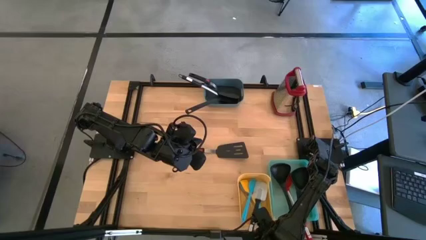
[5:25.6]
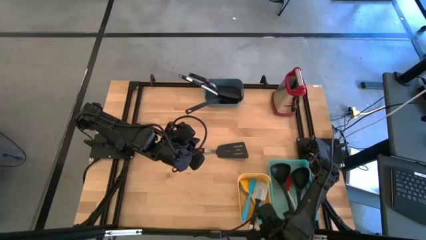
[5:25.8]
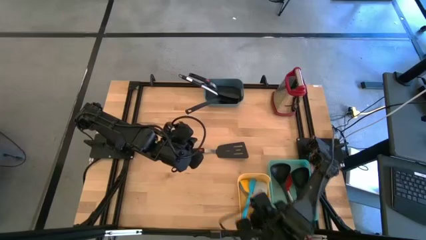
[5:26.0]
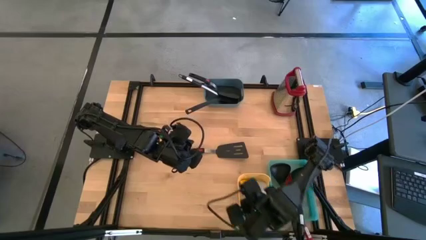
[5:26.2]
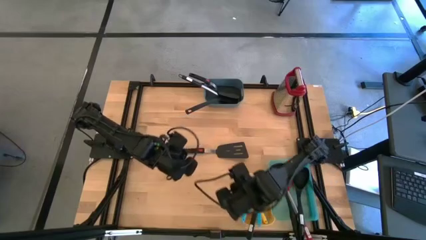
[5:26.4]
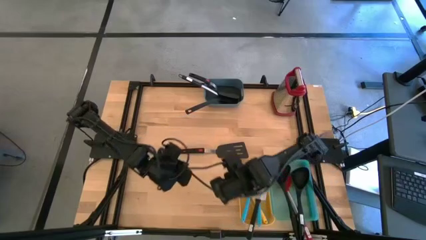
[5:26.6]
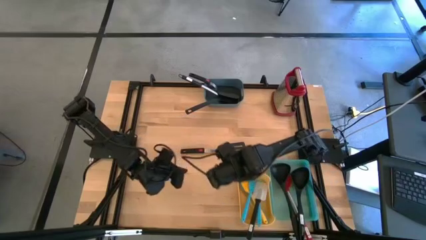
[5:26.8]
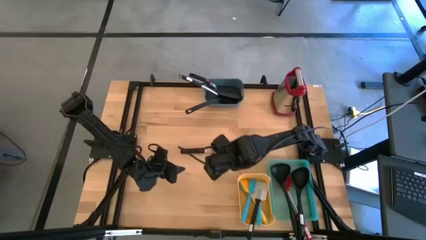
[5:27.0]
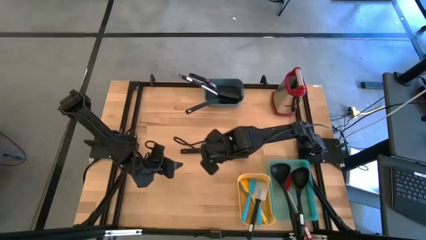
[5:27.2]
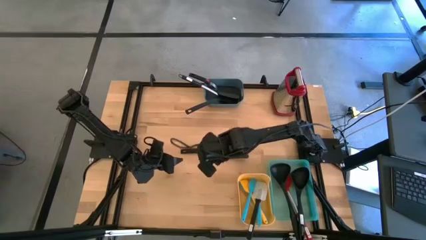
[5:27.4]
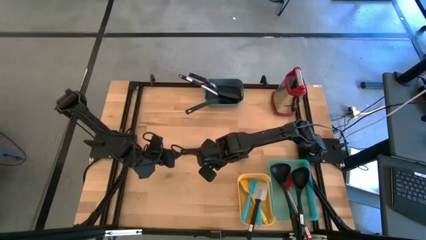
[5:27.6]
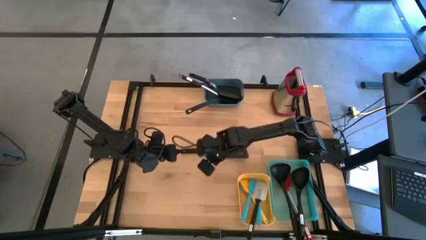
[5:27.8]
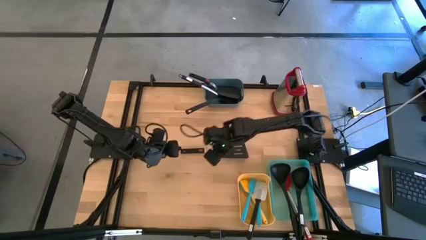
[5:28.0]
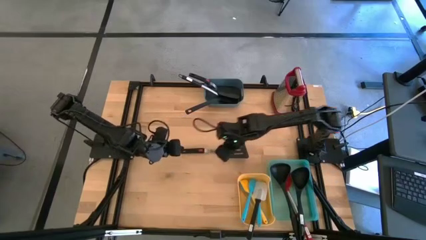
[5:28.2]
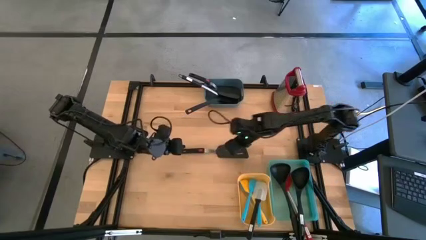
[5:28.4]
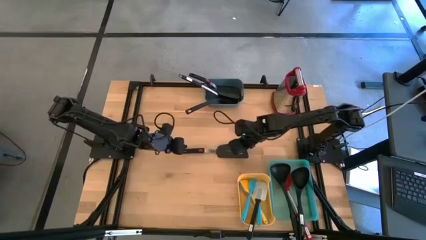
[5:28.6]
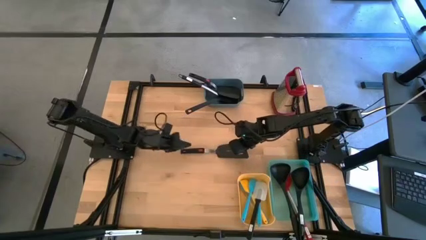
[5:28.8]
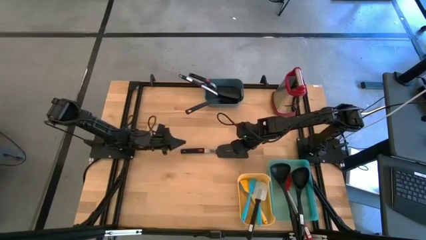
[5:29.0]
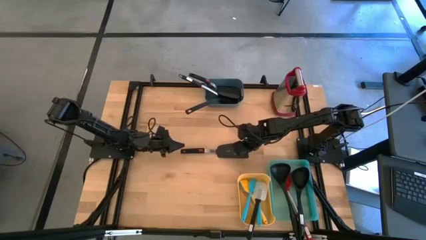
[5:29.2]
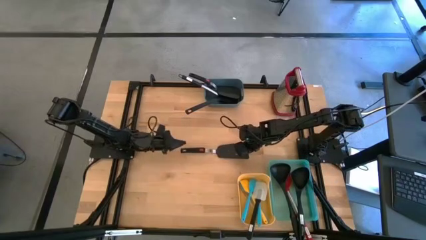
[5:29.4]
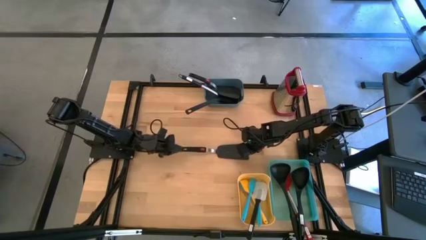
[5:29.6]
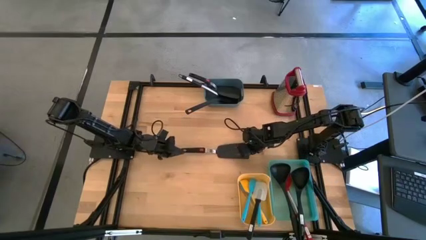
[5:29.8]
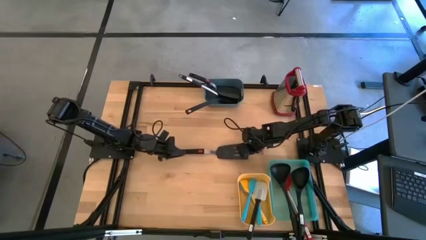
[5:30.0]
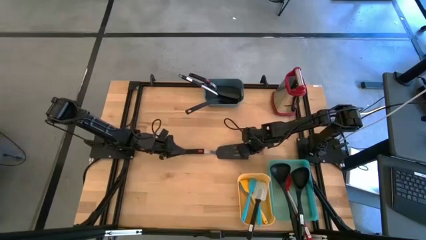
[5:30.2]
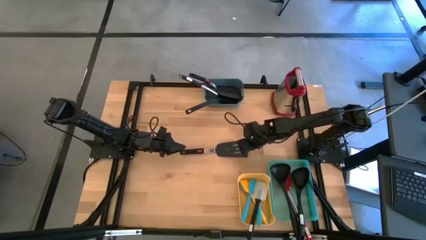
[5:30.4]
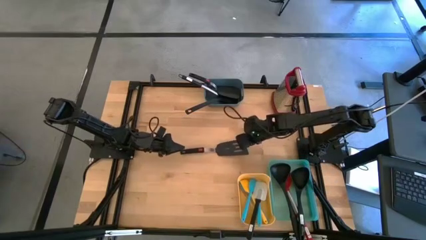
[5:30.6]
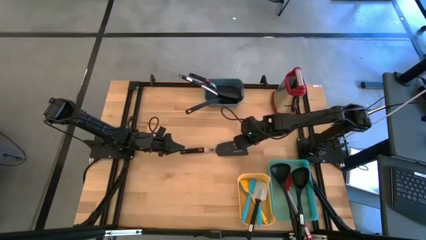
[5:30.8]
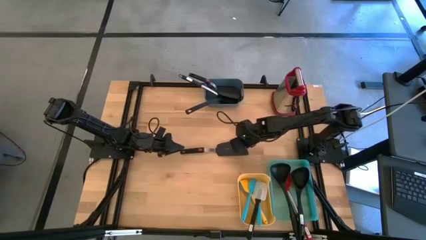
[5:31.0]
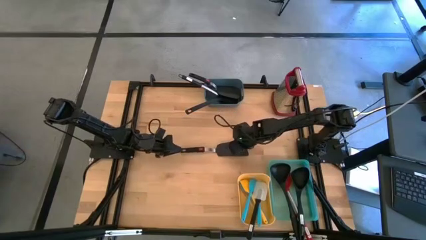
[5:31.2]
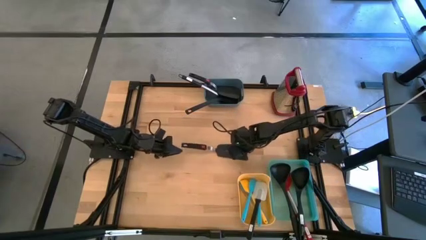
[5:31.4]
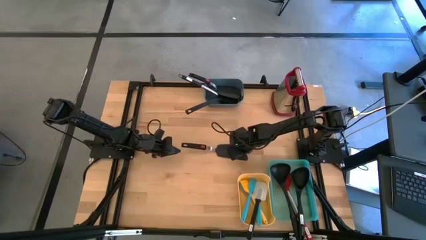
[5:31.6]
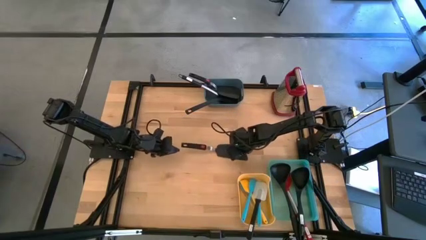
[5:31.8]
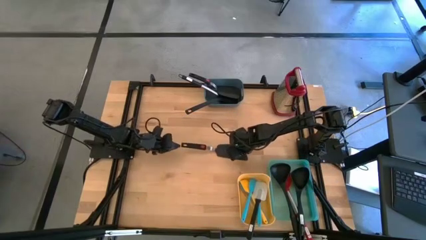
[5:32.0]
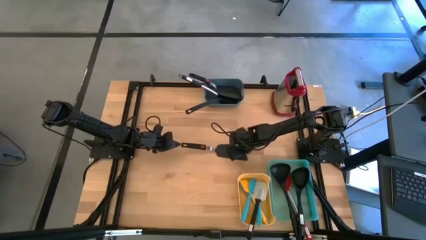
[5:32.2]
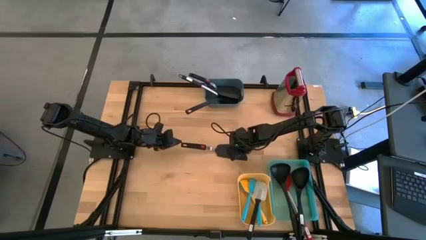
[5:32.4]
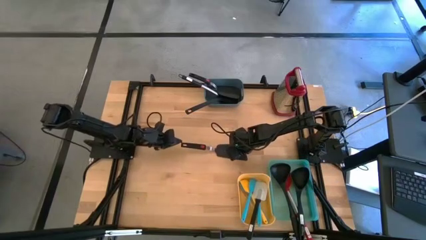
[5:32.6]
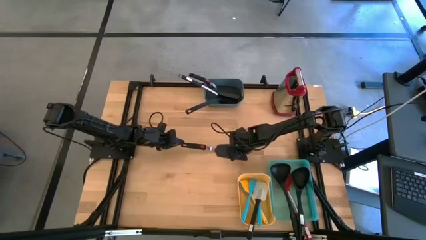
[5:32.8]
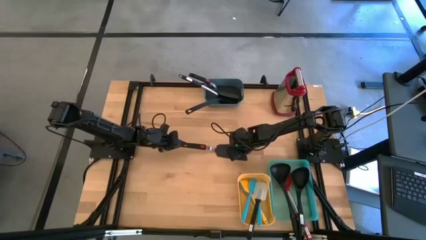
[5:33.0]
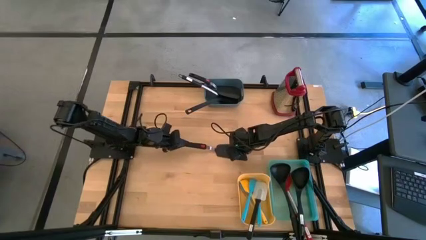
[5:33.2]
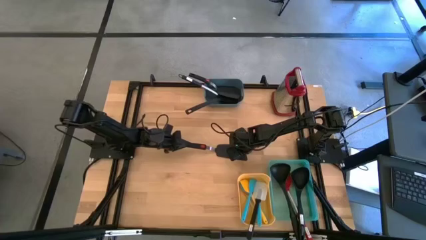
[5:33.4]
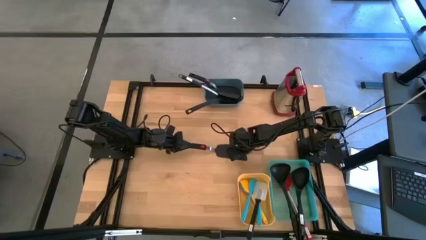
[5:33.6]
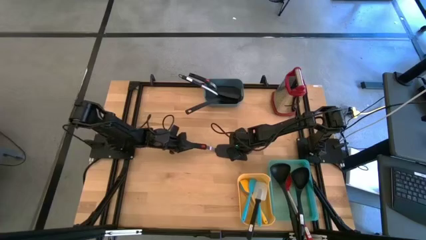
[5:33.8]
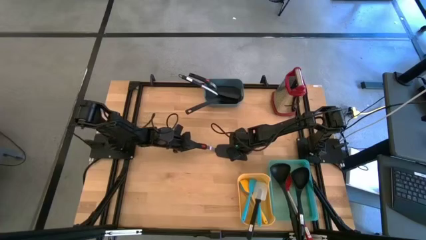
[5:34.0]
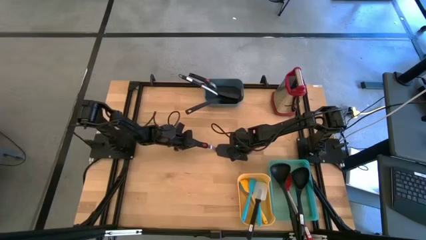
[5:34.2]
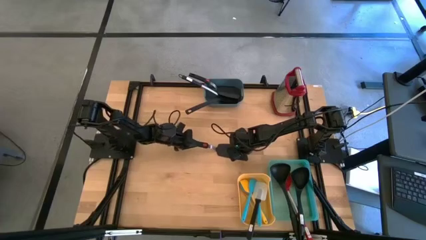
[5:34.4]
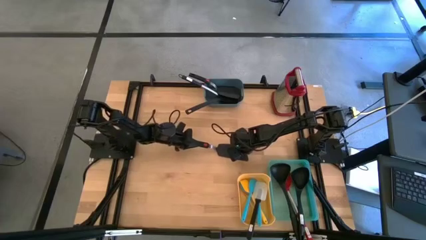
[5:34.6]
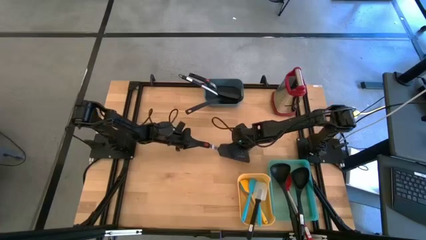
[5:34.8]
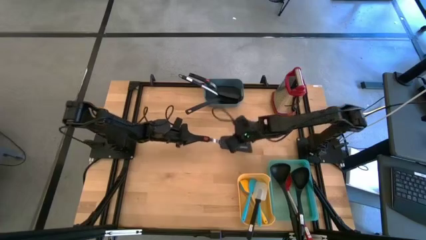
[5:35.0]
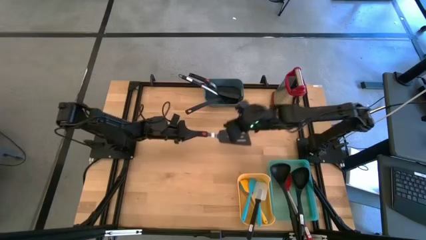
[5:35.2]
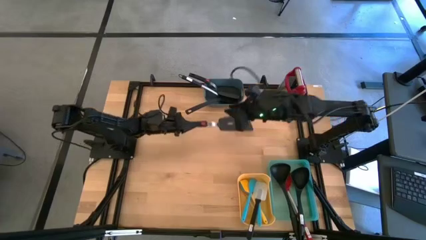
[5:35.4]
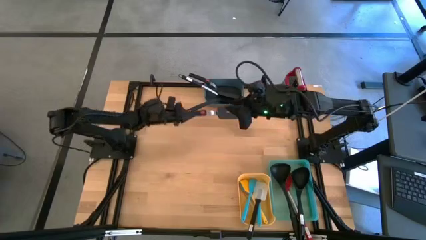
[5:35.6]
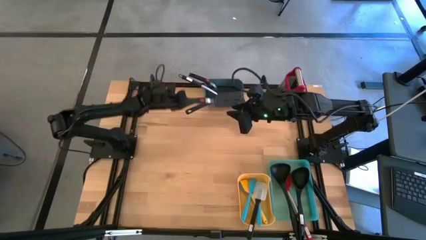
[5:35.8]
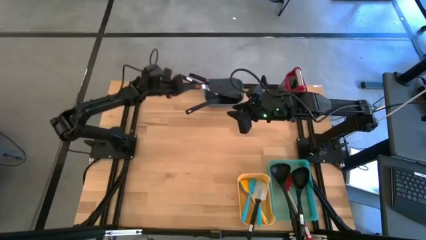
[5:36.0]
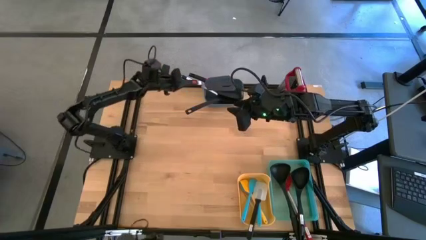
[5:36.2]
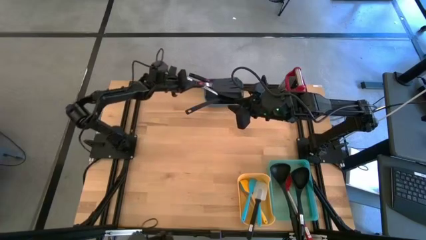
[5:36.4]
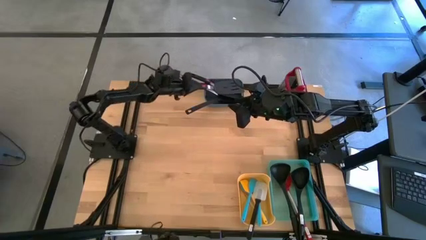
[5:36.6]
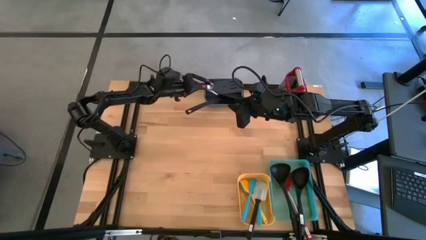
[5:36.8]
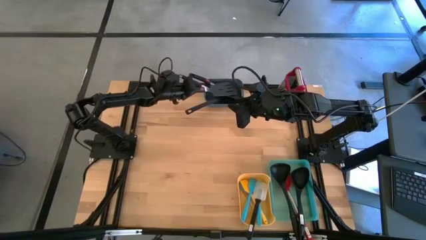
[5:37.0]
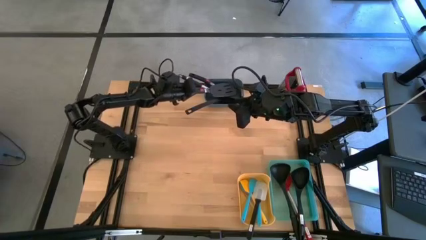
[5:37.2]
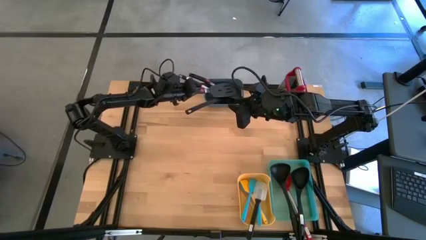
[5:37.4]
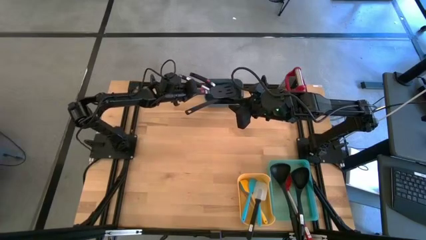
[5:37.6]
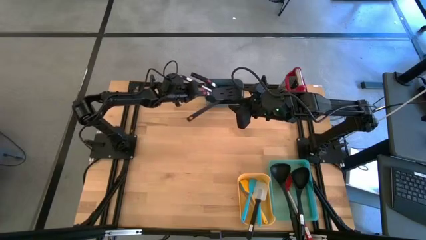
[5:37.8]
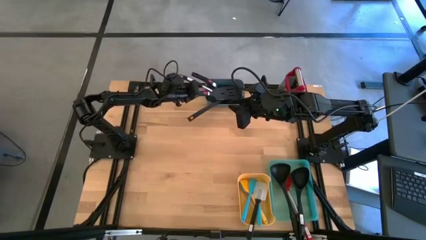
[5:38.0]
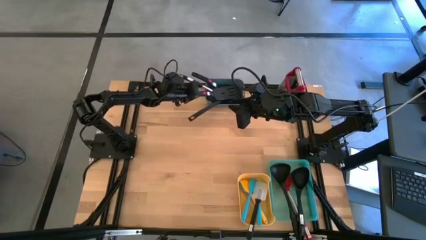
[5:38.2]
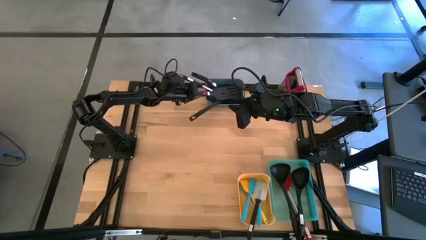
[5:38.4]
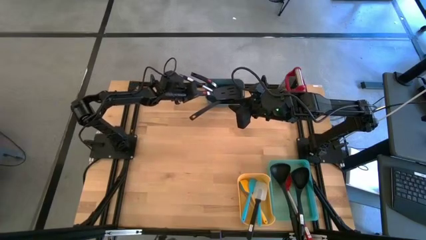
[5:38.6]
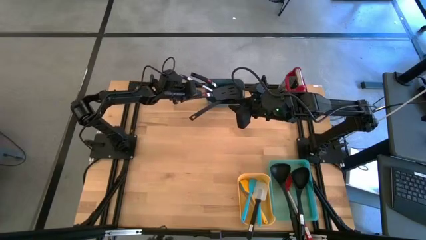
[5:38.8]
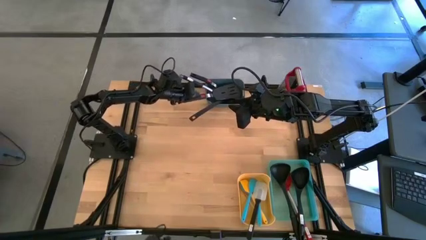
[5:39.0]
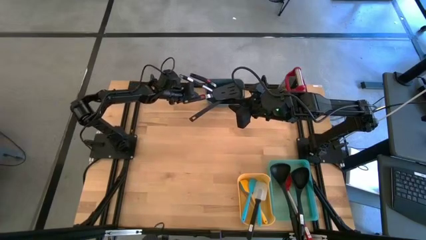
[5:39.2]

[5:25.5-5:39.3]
Task: Pick & Place Kitchen Items
Put the large black spatula into the blue bin

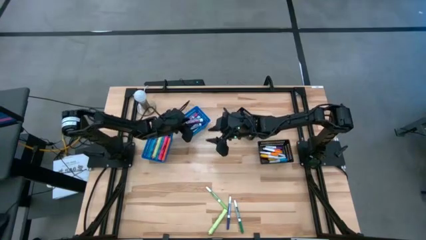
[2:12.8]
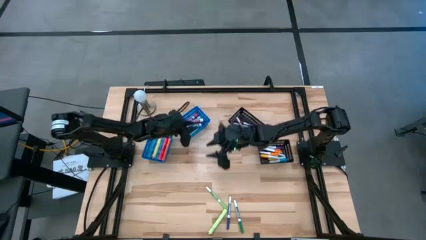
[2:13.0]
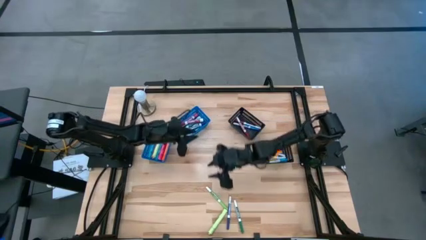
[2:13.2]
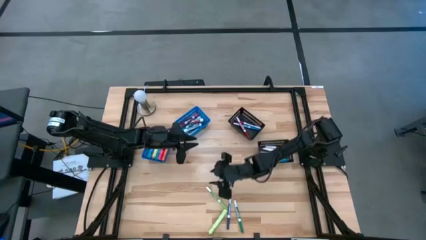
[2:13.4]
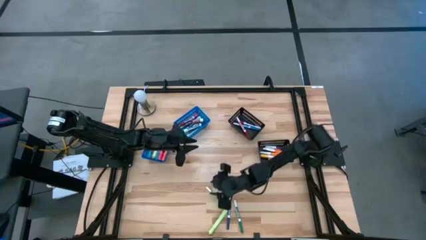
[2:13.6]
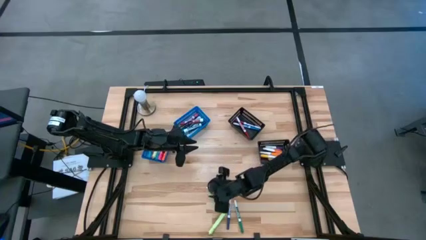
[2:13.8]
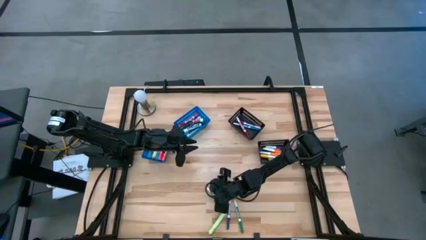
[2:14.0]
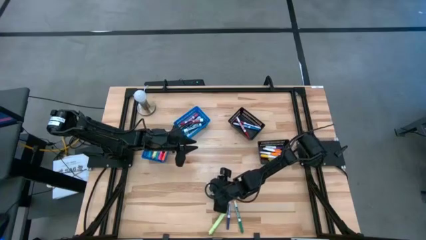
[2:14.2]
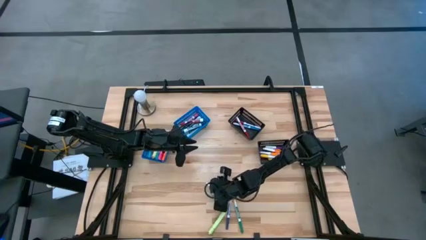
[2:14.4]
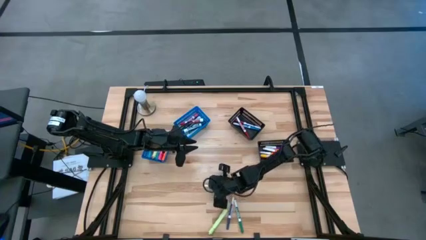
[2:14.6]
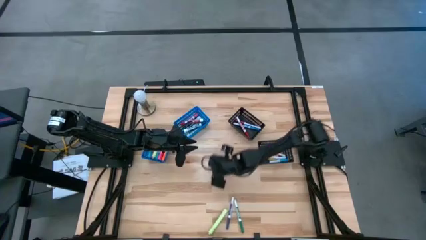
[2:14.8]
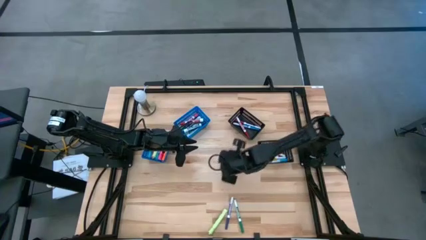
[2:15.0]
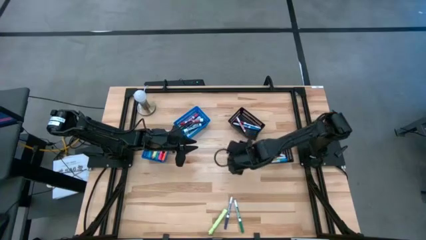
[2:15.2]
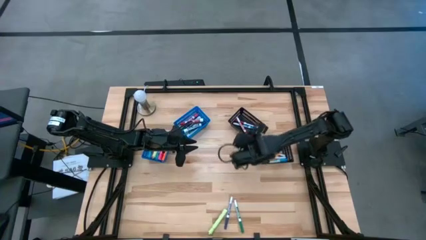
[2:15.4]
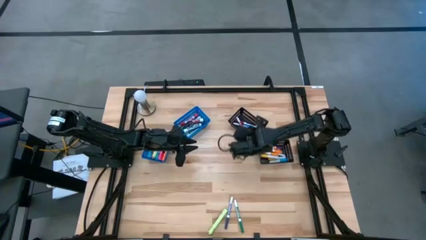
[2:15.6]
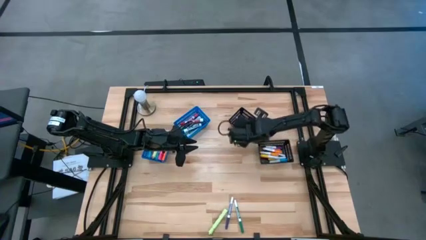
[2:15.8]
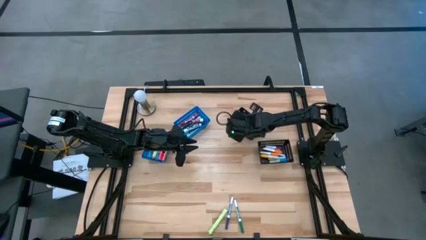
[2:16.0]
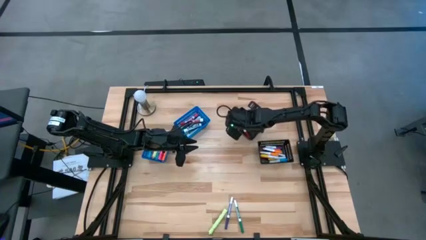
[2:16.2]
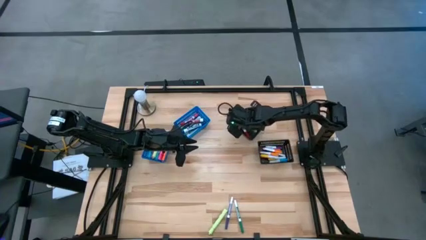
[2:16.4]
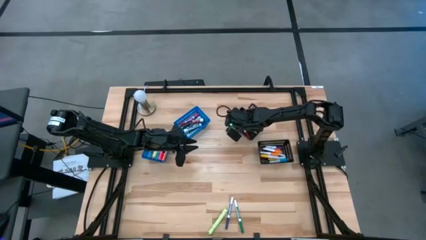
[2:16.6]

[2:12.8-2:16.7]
Task: Pick & Place Markers
Put the light green marker pen into the top black bin
